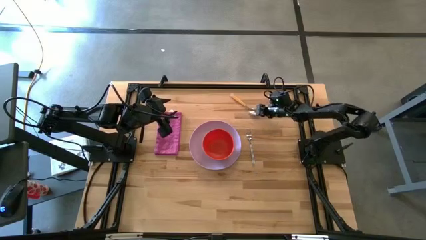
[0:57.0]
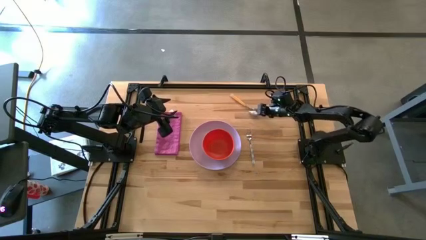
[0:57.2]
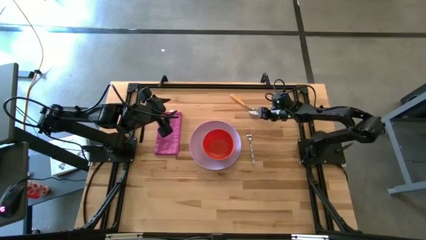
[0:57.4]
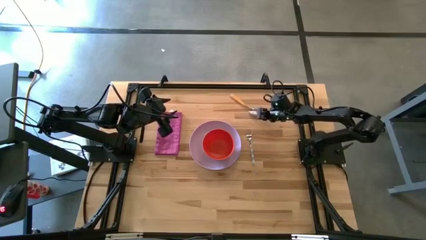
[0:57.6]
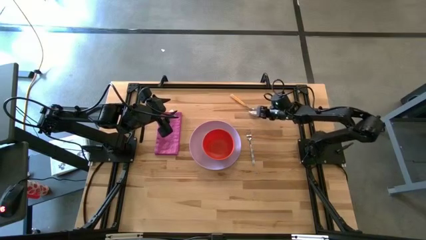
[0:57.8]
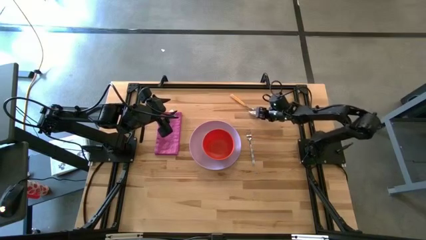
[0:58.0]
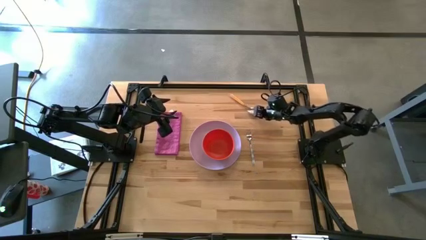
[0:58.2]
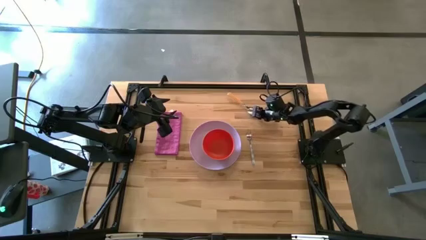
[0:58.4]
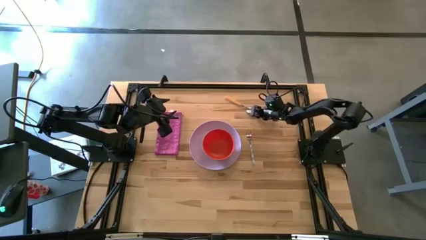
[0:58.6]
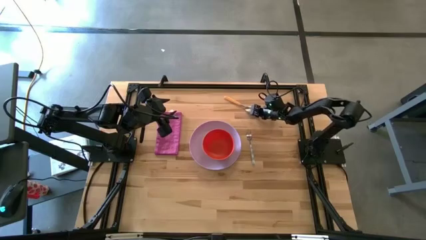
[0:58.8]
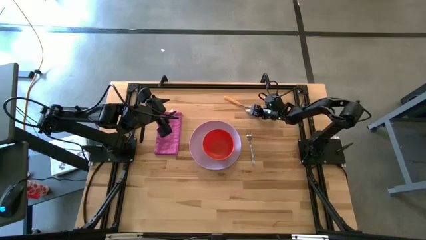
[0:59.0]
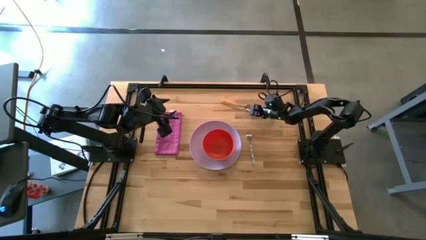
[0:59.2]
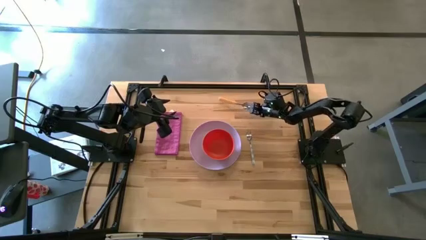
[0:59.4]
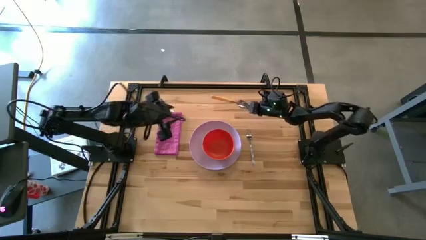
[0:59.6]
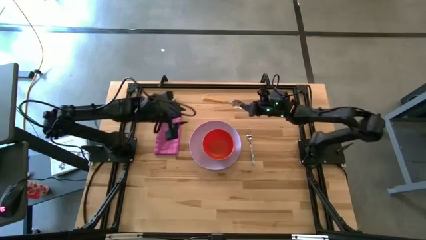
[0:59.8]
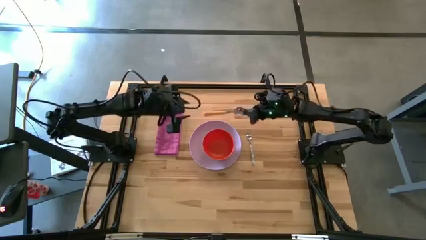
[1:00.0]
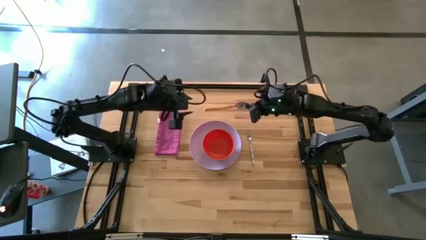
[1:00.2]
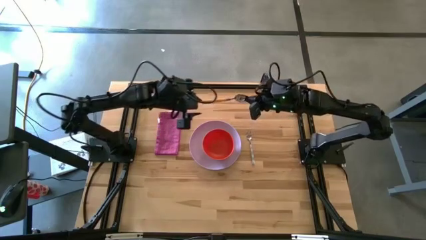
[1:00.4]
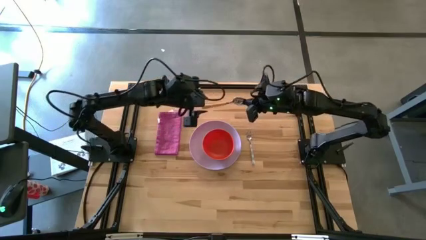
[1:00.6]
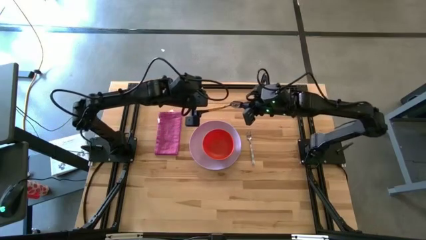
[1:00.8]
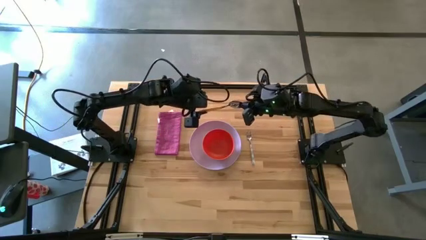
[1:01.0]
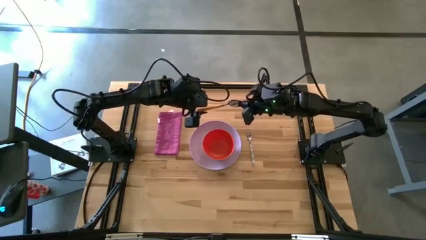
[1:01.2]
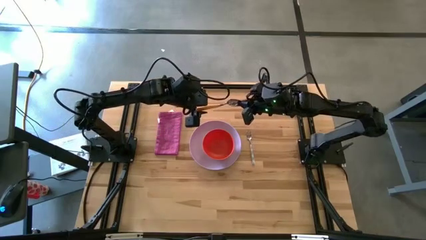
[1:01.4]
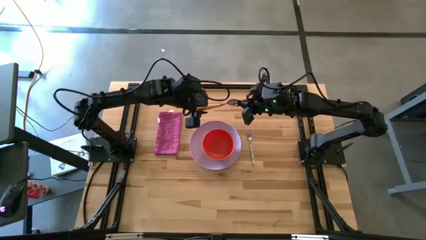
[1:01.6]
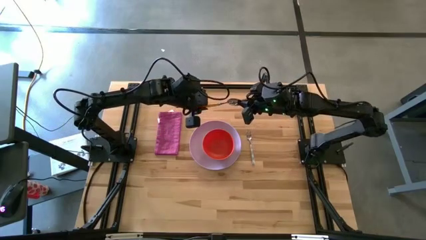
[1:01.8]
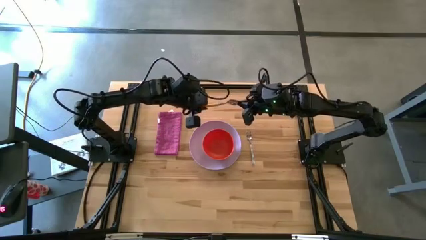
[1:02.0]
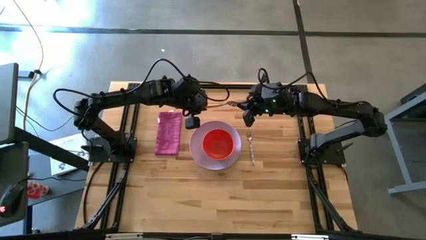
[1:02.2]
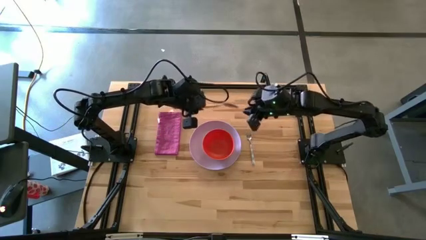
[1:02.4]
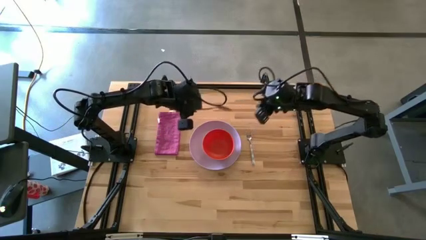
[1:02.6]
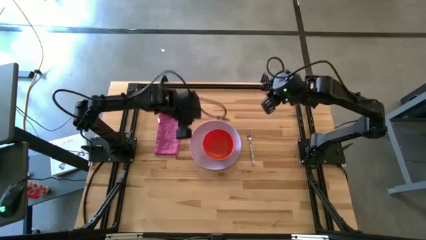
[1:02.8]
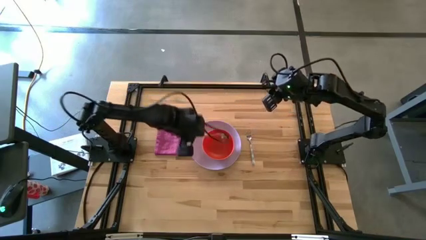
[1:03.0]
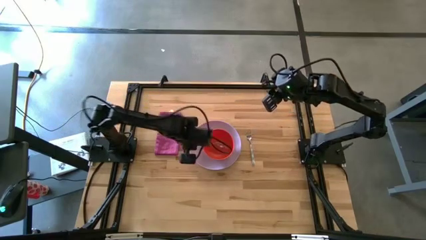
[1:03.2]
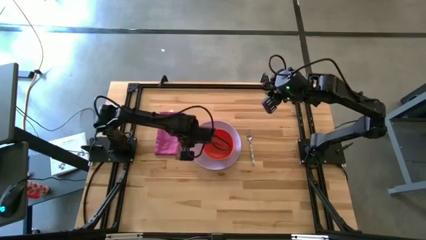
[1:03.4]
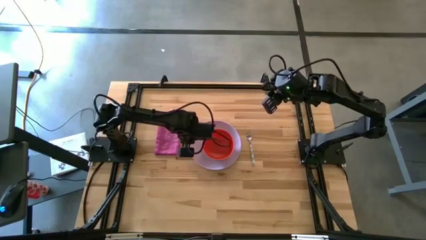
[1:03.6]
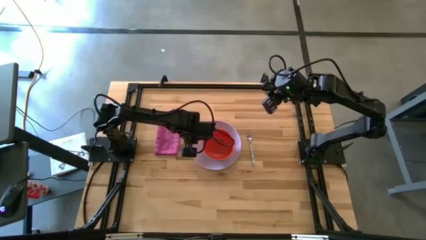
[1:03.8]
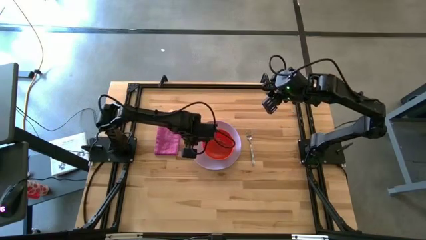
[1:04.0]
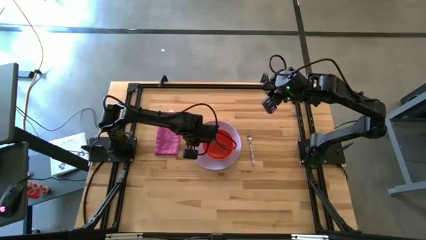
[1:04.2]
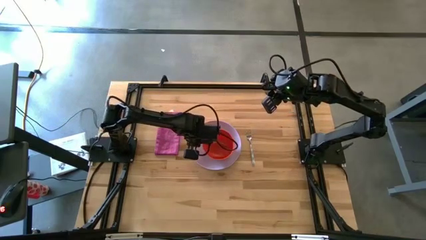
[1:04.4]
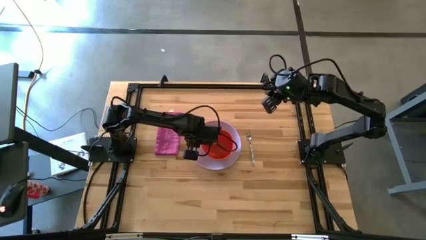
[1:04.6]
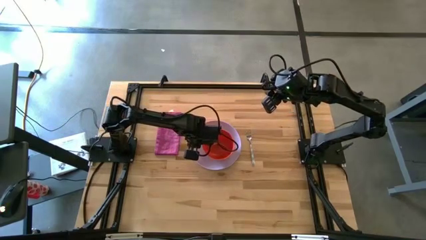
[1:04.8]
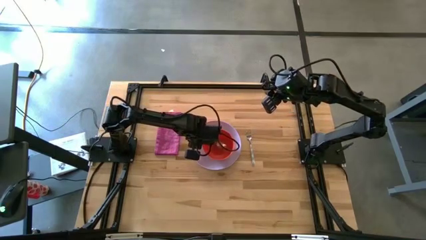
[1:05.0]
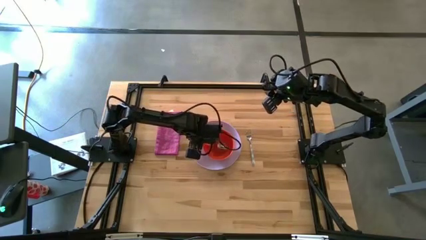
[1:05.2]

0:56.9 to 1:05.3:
Task: Set table place
Put the yellow spoon into the orange bowl

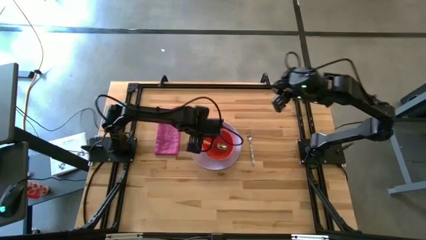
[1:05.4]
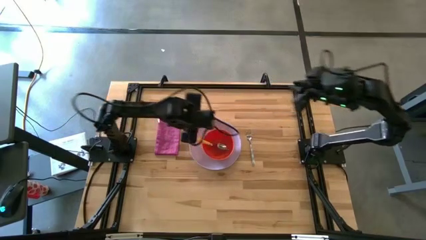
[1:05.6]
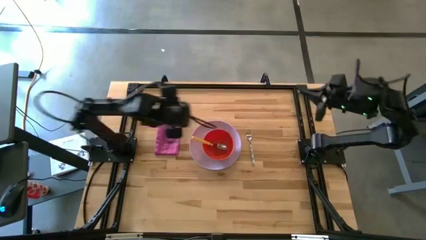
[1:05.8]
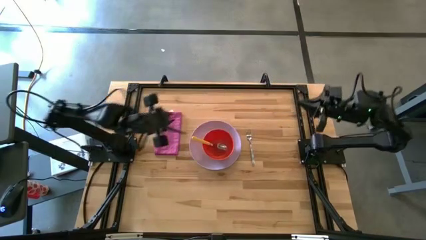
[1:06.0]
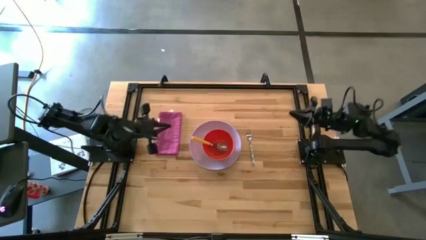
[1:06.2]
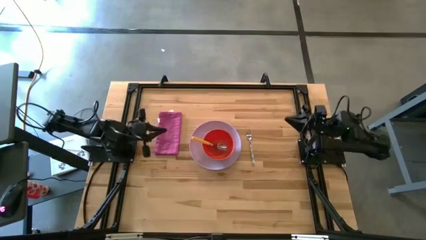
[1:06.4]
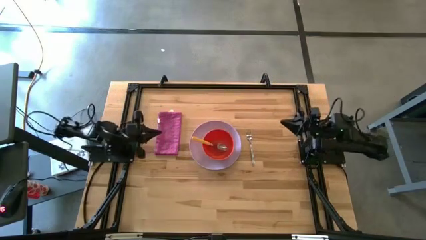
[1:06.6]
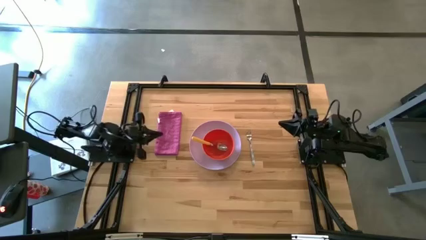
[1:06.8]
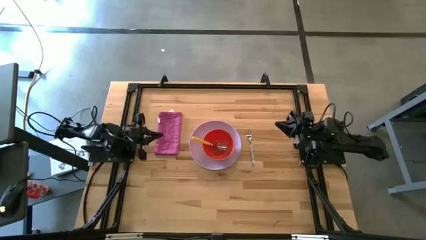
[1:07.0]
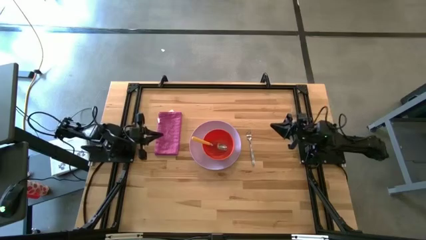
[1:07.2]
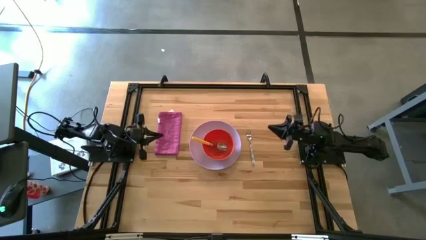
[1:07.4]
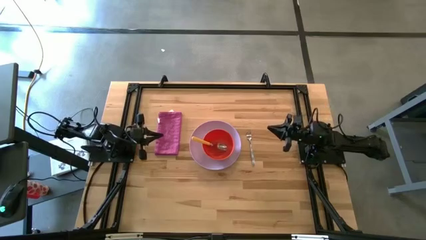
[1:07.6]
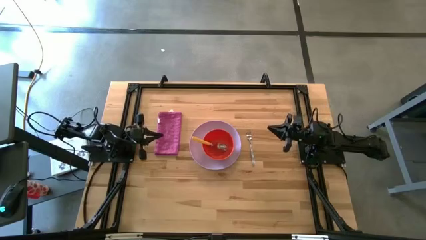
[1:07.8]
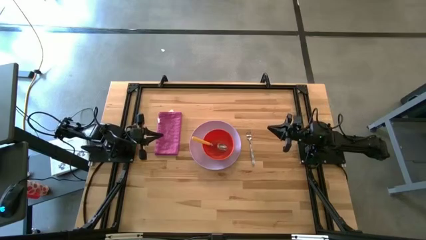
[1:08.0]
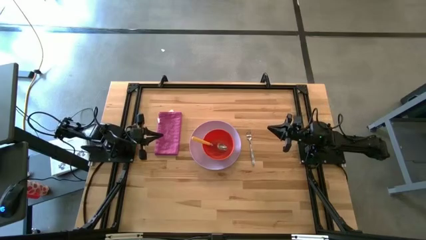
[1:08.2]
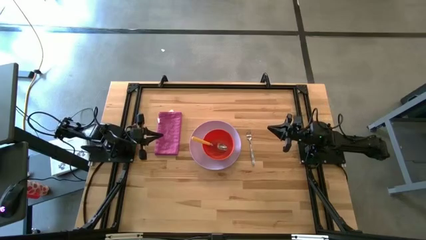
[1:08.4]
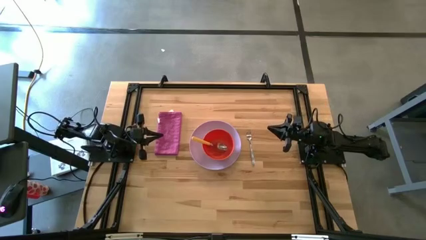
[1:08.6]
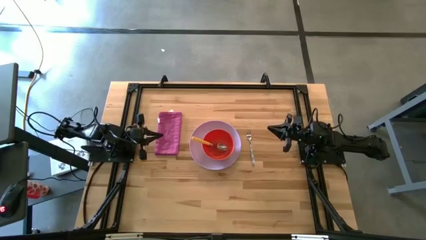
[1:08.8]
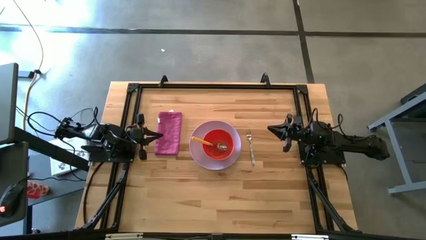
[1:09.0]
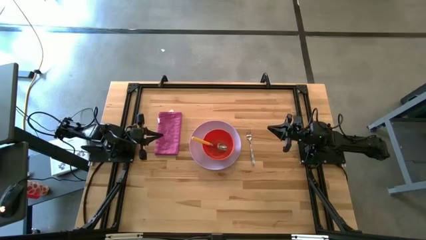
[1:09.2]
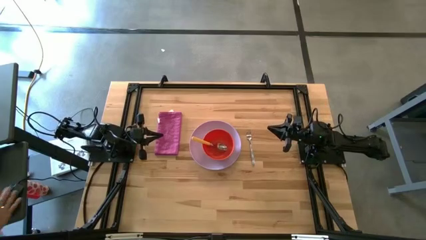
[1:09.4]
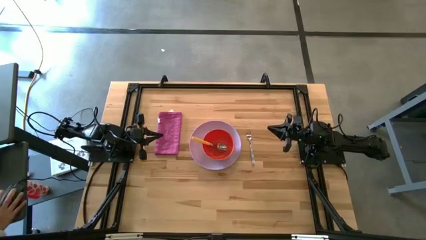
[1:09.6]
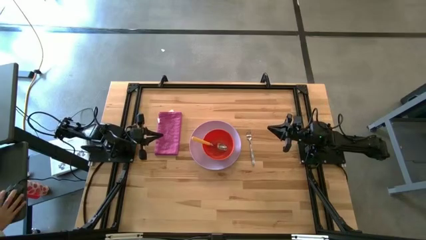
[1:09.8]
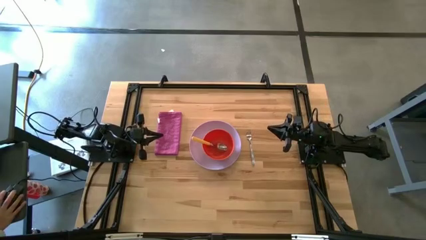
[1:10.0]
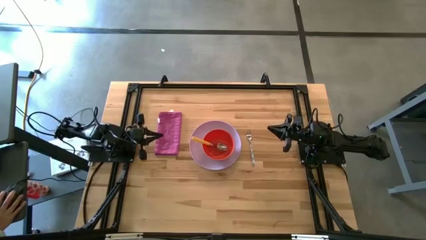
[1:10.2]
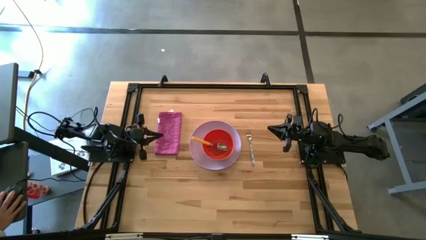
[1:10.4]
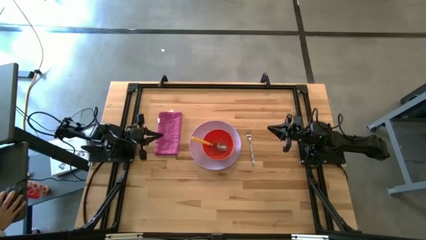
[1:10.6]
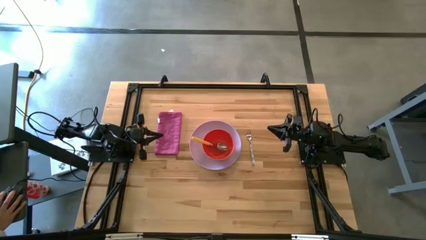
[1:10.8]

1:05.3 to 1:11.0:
Return to Home Position

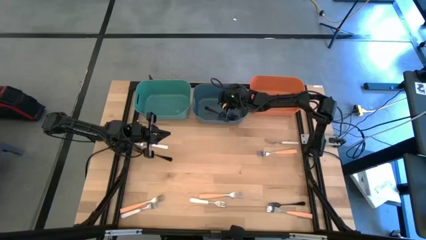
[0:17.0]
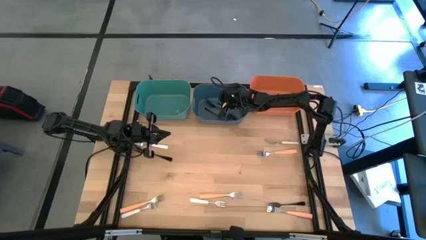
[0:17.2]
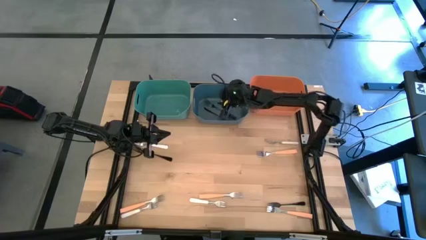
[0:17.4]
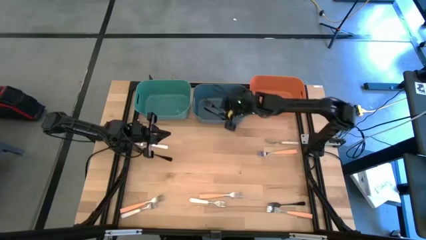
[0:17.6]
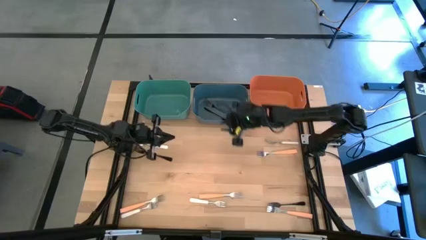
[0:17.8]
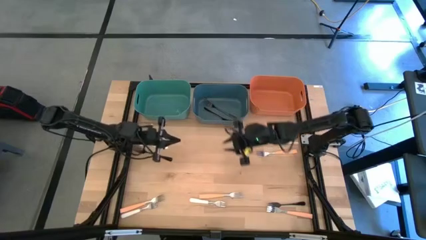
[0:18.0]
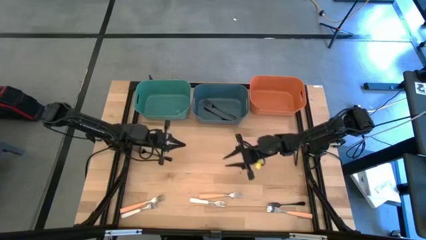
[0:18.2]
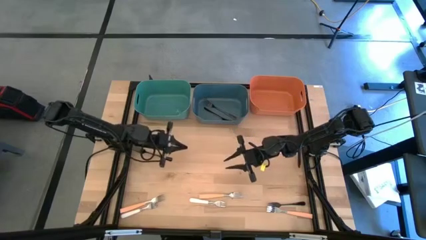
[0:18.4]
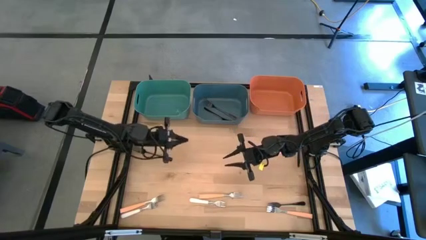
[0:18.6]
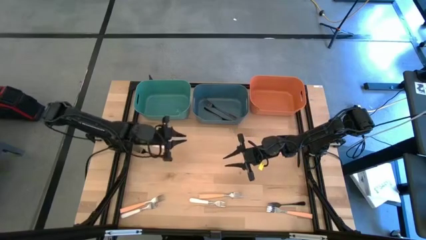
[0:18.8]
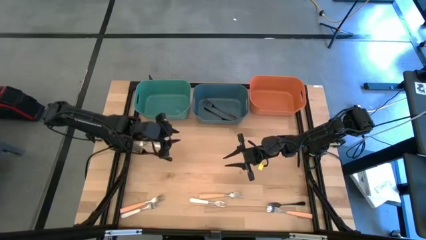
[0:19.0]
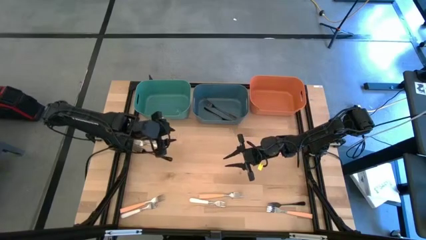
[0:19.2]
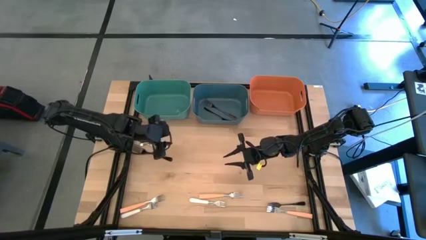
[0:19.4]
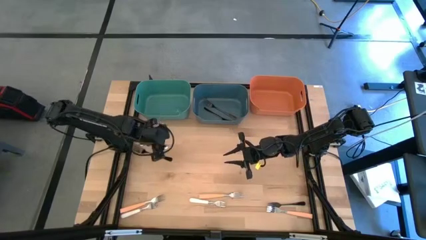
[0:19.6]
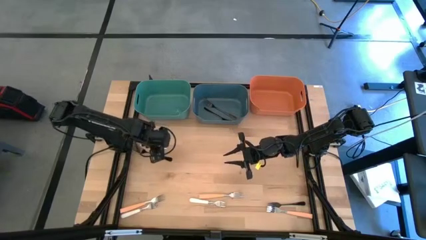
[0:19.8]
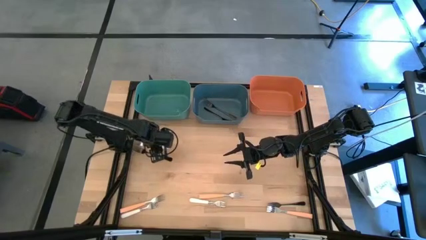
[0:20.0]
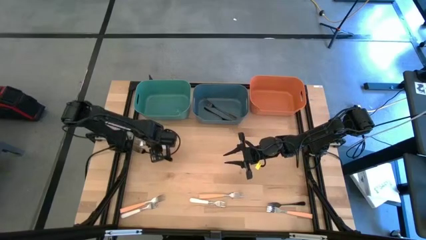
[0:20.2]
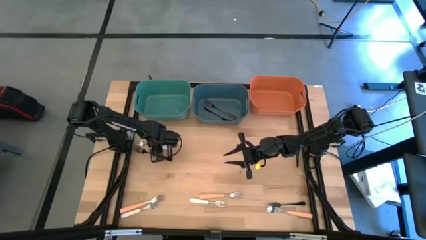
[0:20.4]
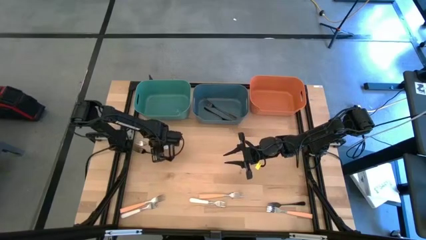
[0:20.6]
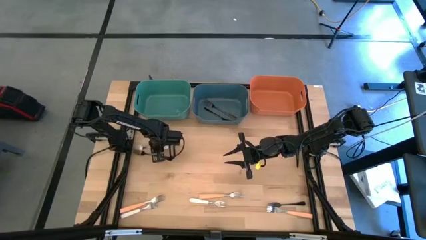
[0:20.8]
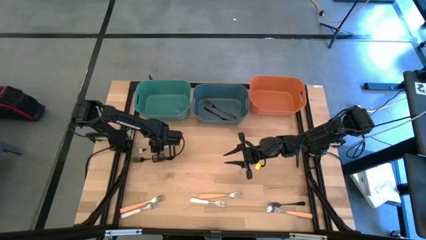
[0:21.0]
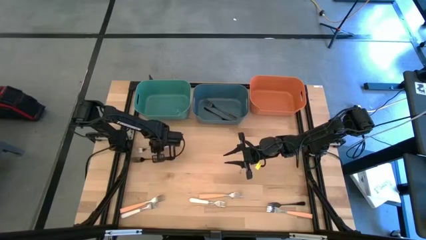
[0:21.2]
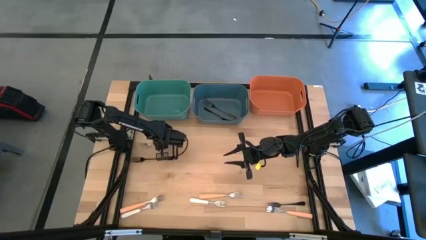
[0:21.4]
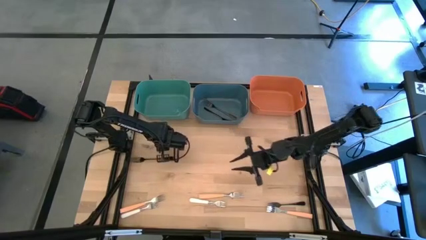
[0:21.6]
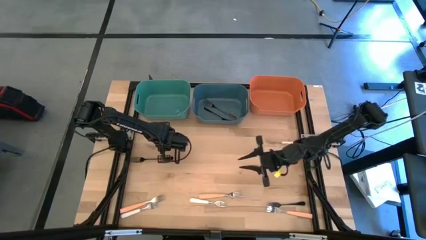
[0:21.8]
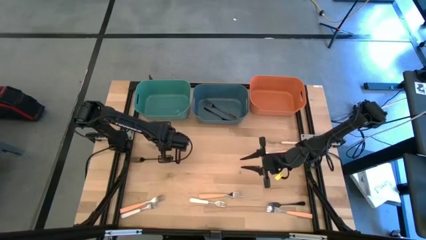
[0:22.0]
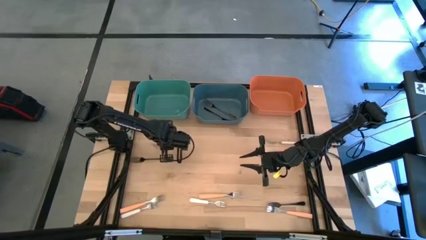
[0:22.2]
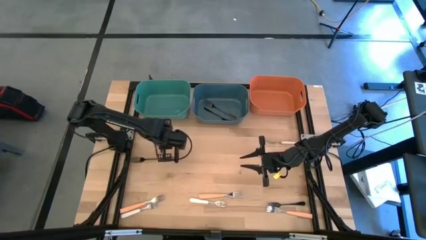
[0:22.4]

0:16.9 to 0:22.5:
Task: Sort silverware by color (type)
Put the top left white fork into the green bin
